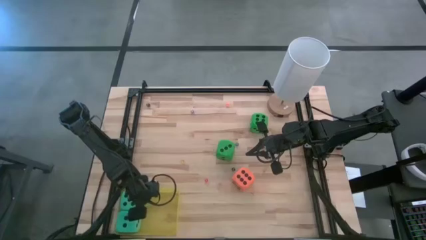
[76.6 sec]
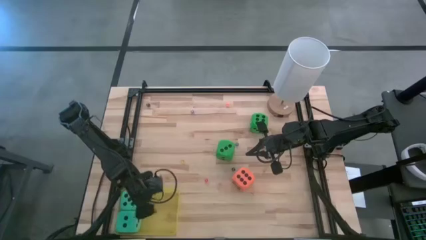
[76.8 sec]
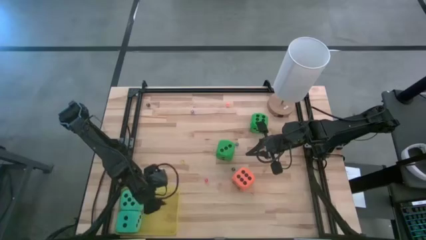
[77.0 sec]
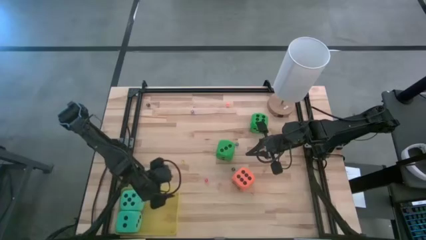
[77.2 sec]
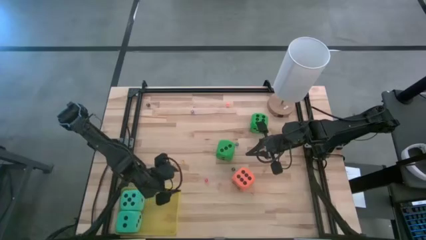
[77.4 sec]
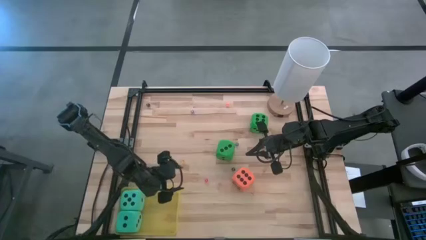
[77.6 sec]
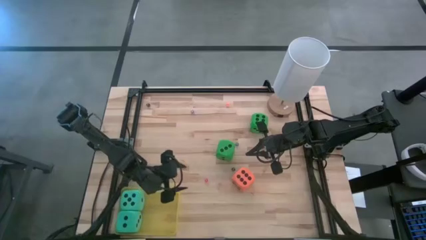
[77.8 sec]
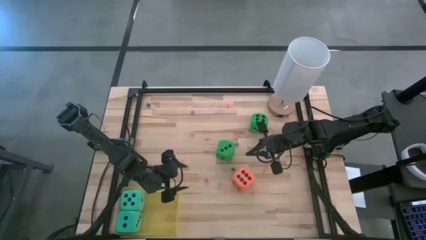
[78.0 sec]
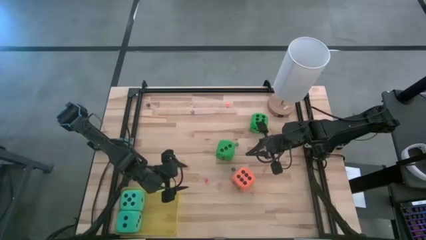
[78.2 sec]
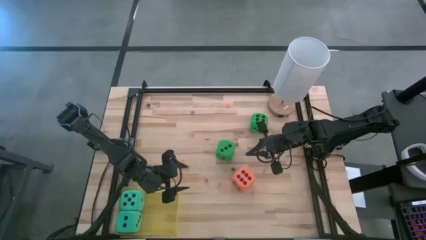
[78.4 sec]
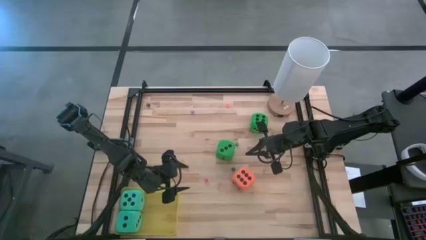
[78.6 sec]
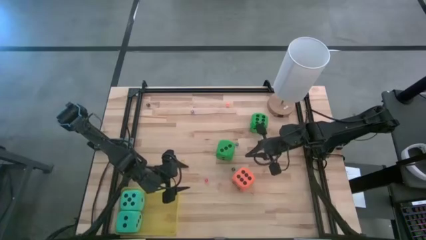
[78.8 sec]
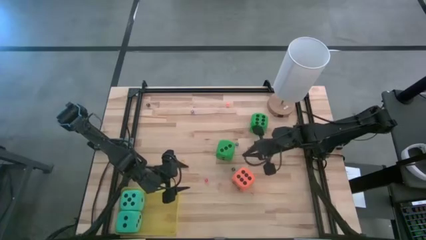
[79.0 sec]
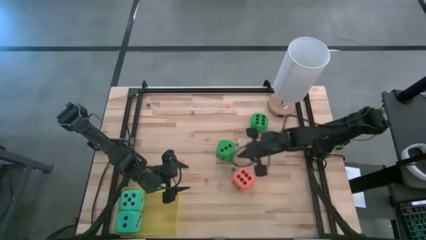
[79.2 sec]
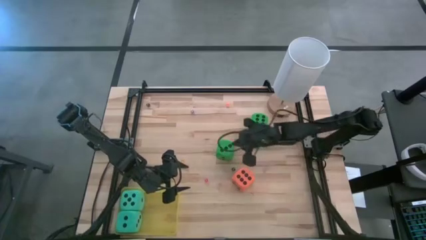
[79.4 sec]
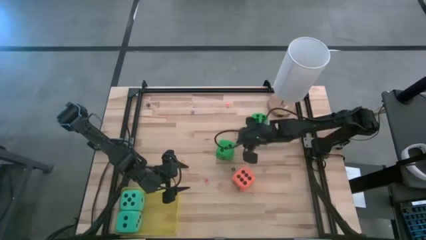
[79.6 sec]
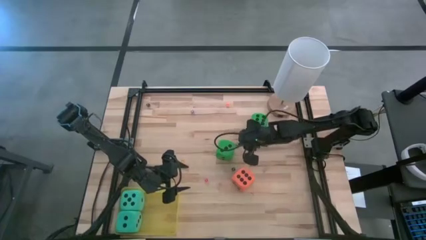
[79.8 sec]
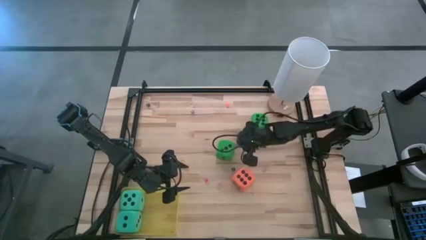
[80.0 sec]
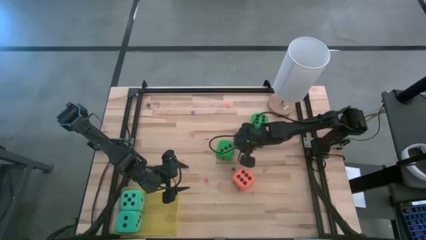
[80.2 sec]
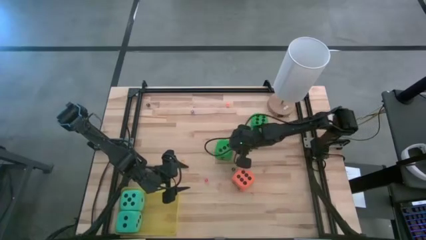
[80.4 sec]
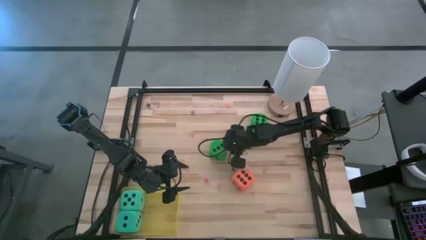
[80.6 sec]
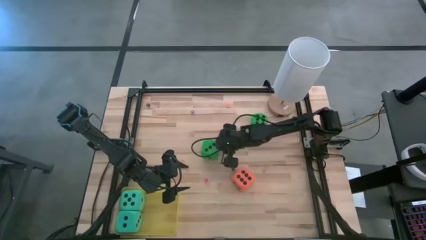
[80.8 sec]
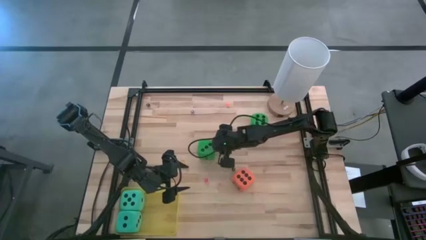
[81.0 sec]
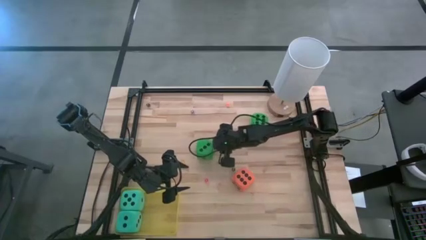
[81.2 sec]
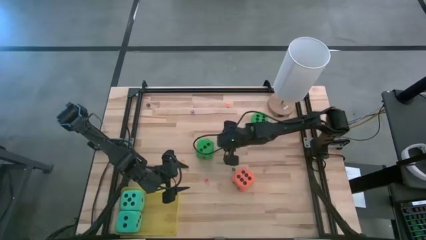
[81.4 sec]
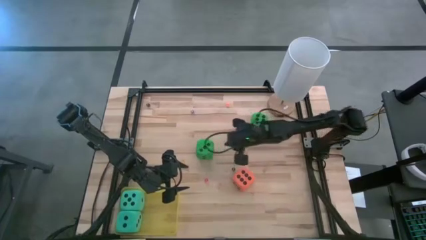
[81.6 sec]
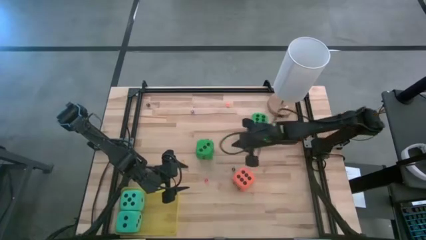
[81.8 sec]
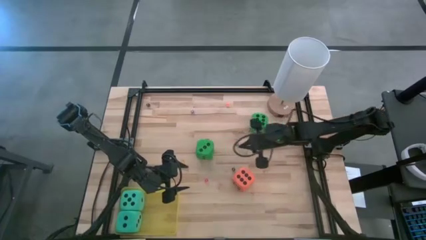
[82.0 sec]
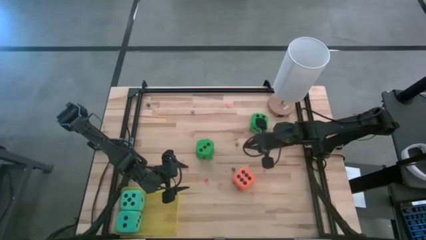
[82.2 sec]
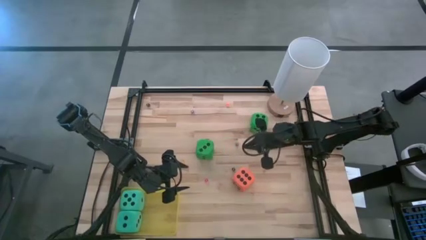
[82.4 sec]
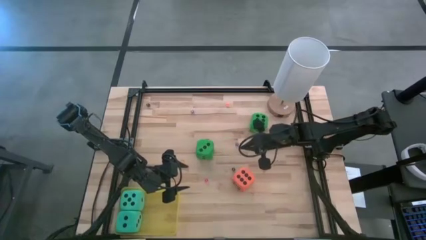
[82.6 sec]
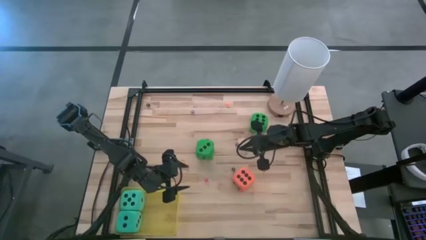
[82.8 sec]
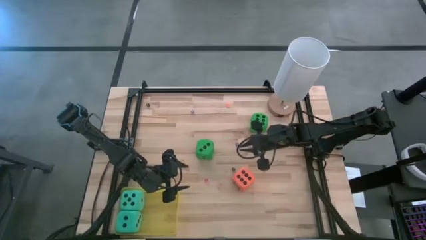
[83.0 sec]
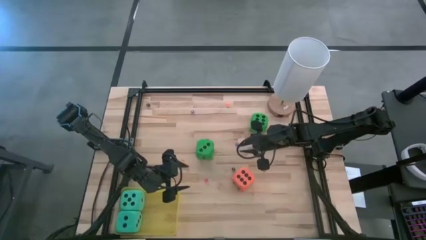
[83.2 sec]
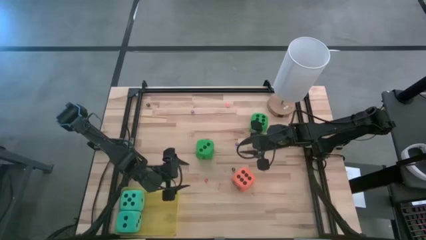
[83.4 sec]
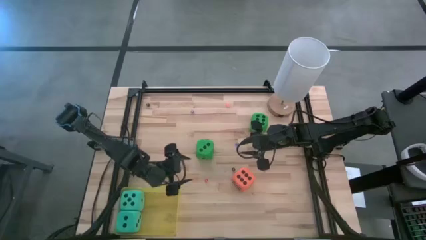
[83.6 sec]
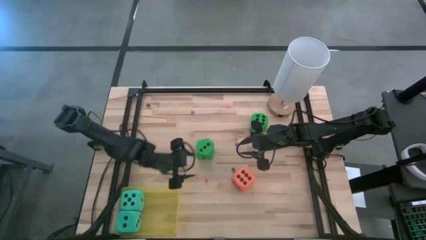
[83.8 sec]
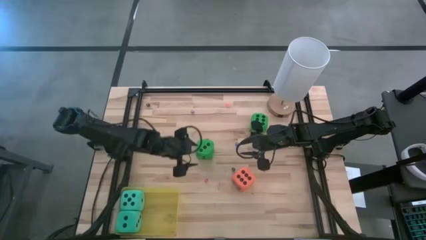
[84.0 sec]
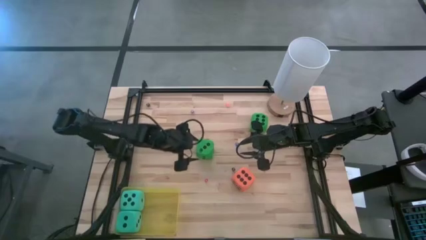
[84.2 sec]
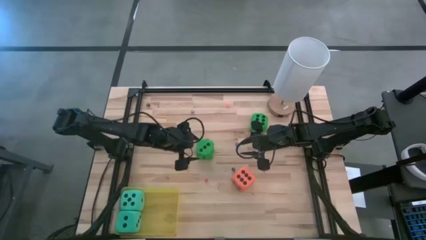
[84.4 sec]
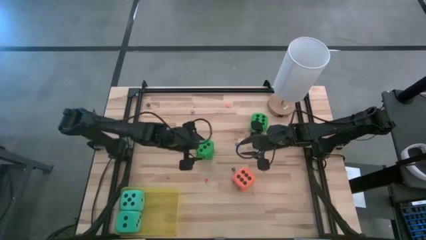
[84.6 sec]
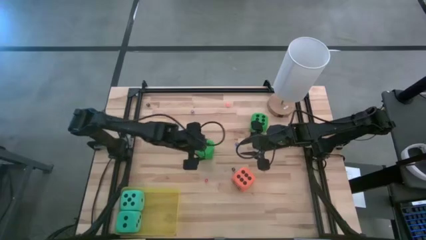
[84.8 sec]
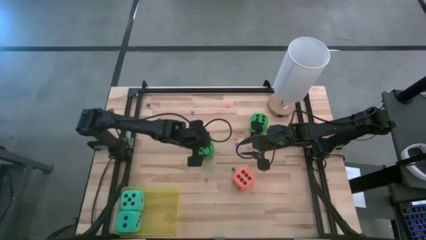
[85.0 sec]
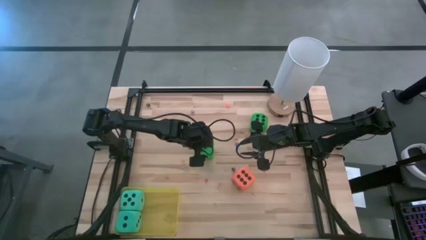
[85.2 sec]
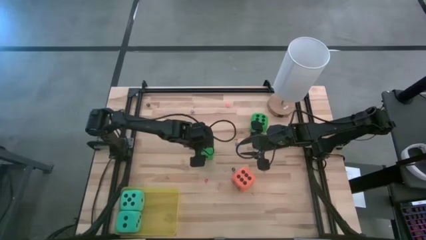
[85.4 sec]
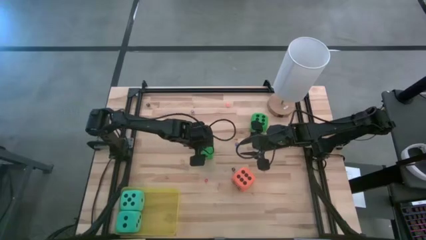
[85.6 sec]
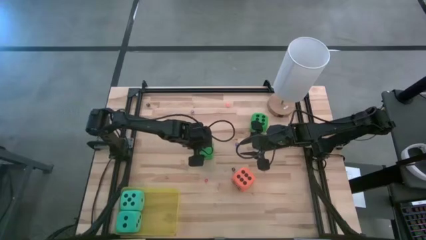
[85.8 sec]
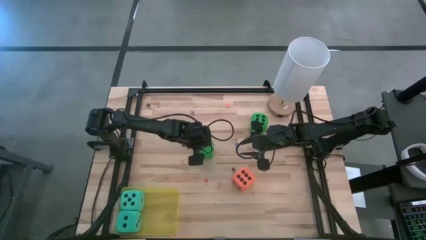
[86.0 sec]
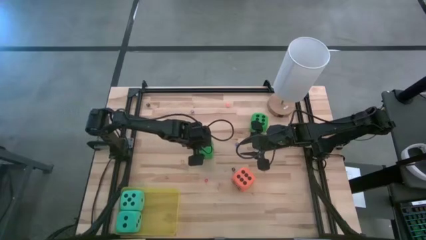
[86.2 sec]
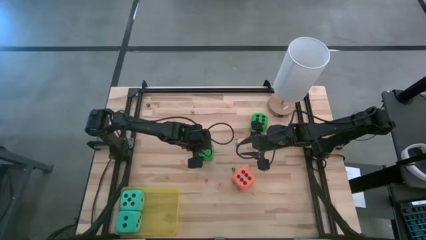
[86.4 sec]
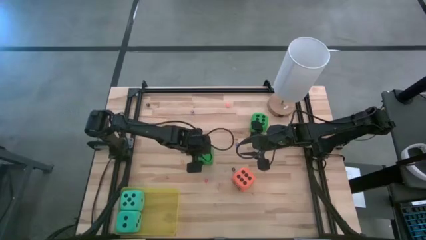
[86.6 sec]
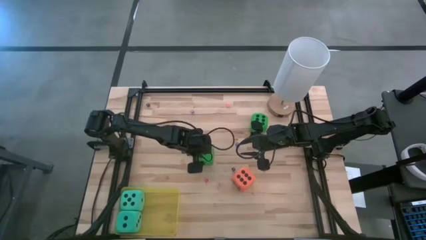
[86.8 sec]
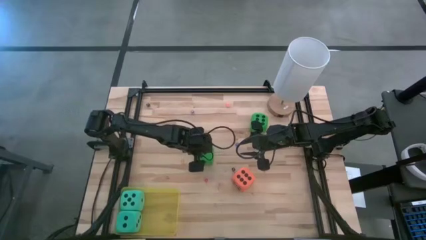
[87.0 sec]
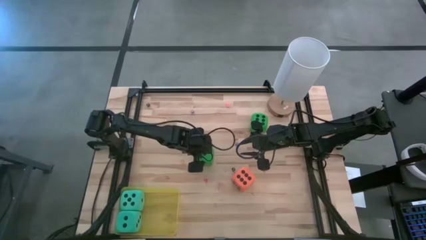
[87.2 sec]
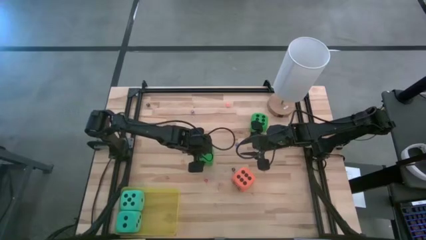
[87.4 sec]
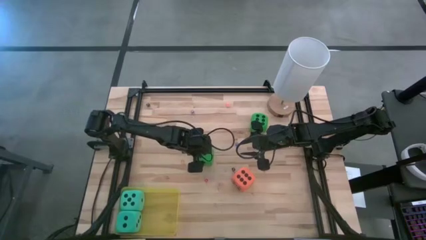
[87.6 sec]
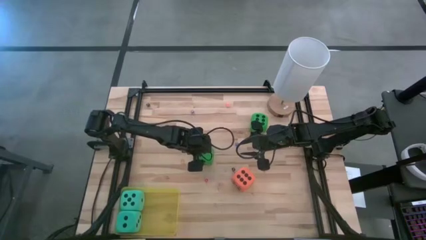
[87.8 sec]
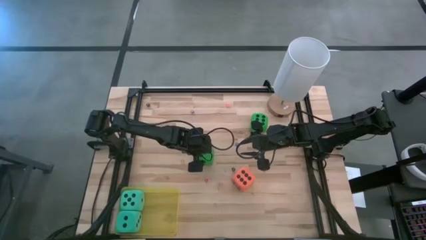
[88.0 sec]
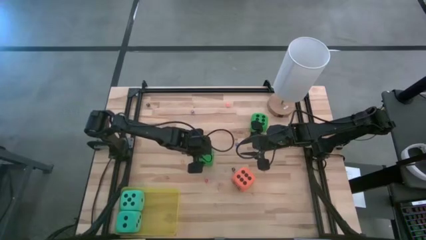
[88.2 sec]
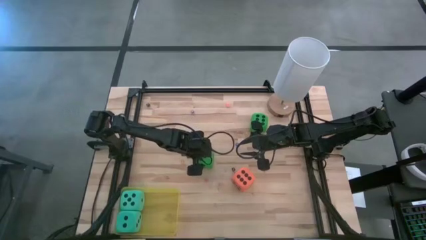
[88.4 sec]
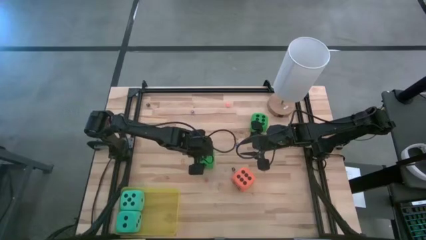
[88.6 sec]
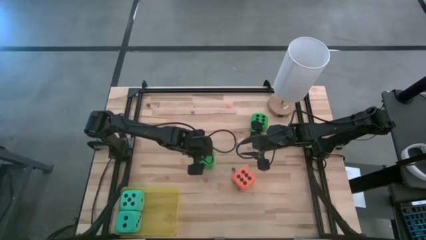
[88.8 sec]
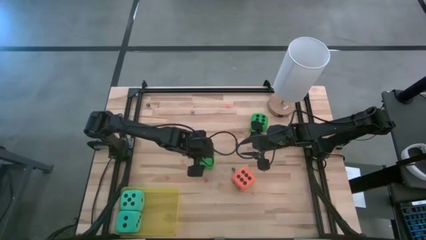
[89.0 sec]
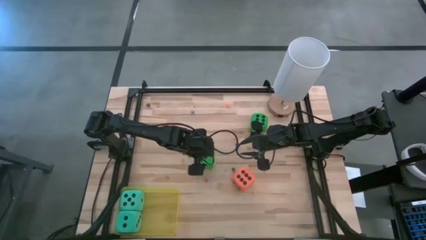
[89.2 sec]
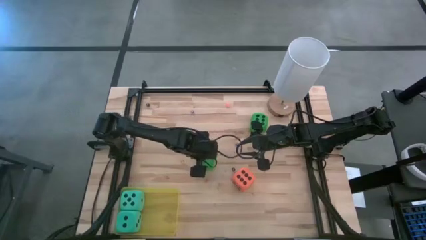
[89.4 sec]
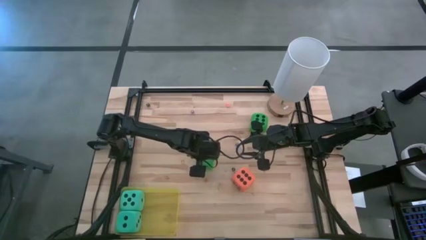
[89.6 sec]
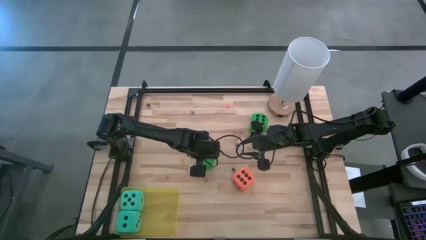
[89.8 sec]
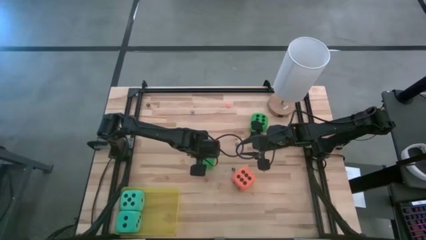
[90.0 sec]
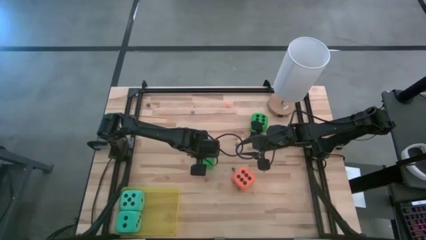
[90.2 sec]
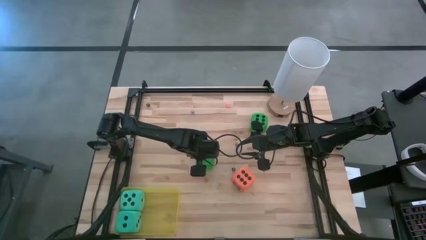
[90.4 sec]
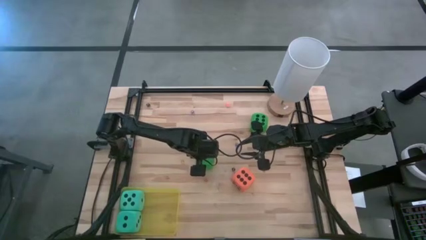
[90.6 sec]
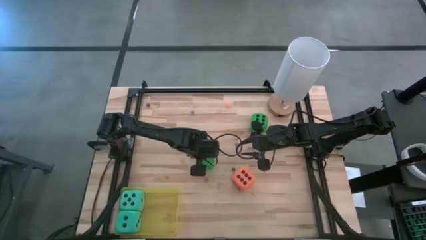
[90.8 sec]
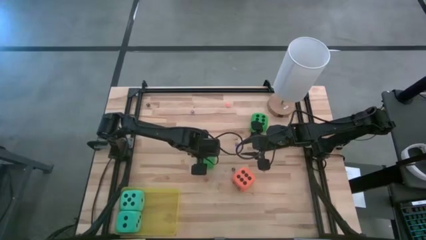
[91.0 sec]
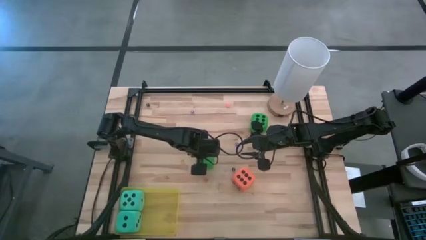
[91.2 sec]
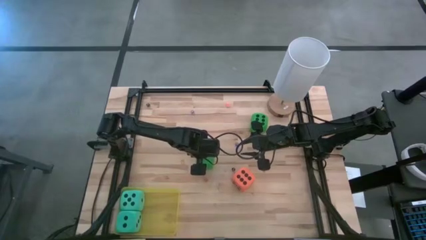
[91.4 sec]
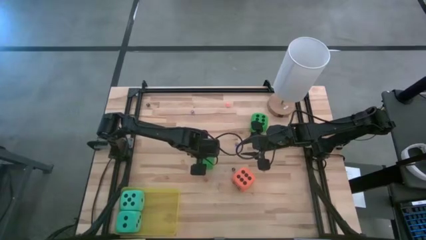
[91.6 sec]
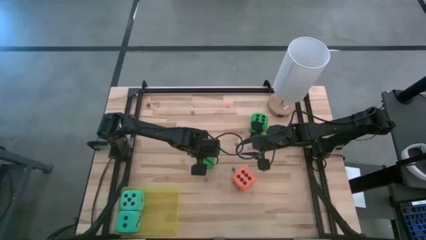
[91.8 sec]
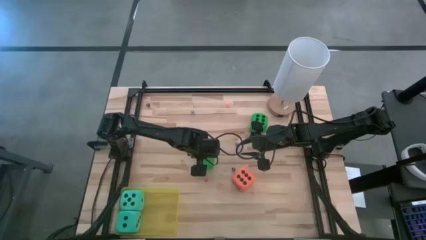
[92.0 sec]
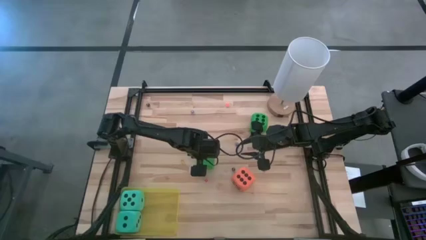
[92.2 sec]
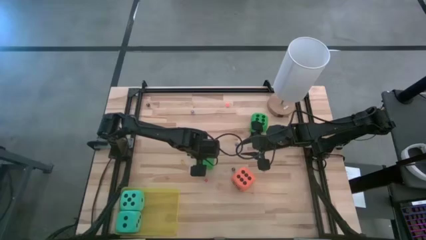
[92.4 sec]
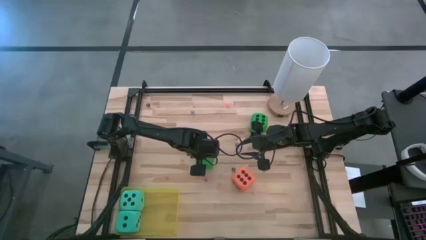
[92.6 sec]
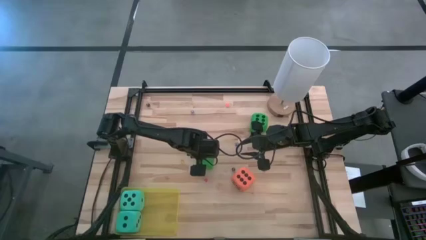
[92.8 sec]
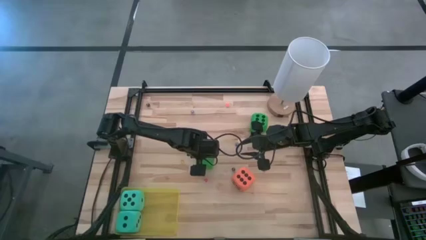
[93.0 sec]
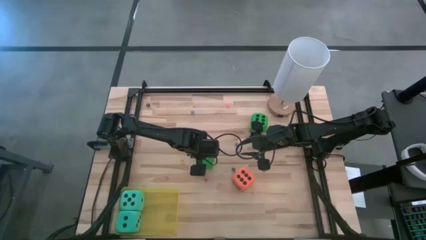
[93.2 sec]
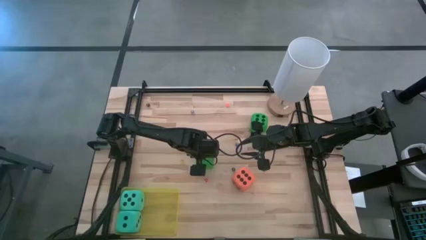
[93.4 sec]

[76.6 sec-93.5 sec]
Task: Pick & Place Dice
Put the bottom large green dice into the yellow bin
